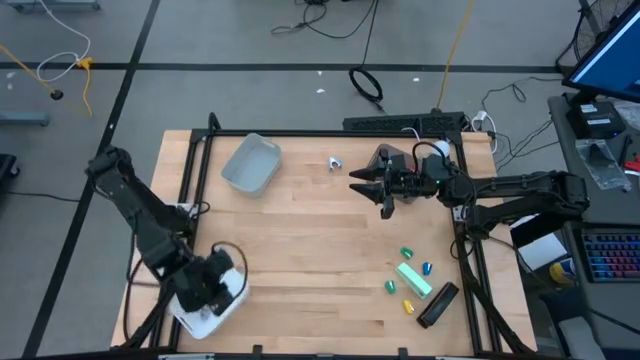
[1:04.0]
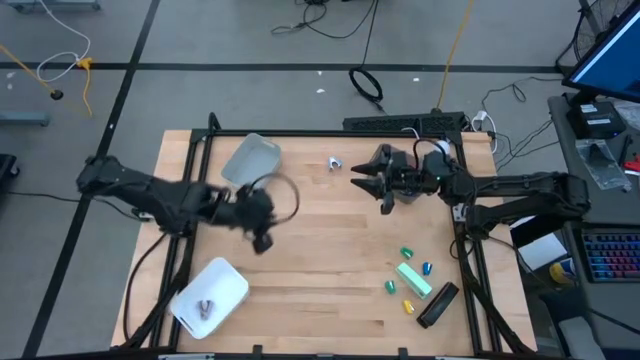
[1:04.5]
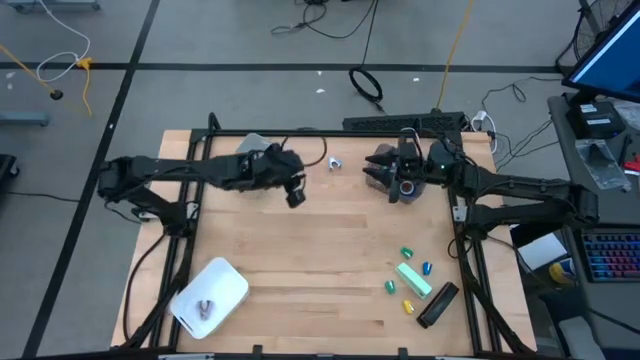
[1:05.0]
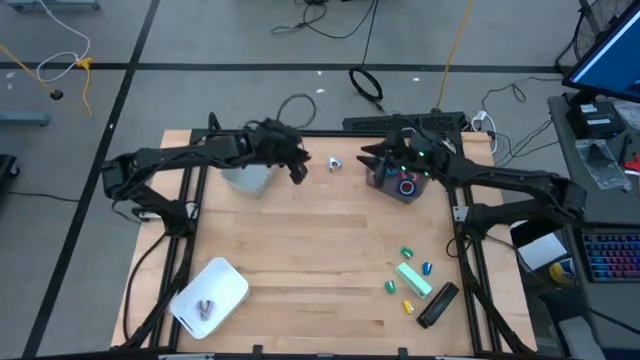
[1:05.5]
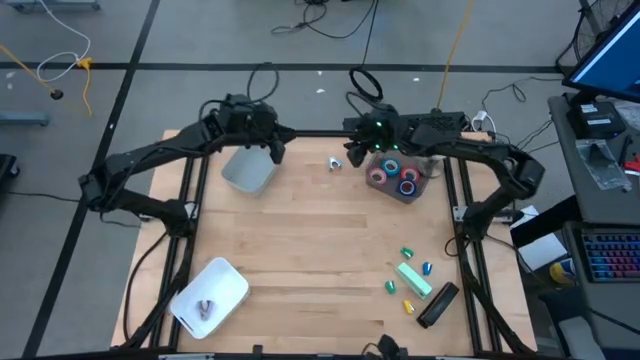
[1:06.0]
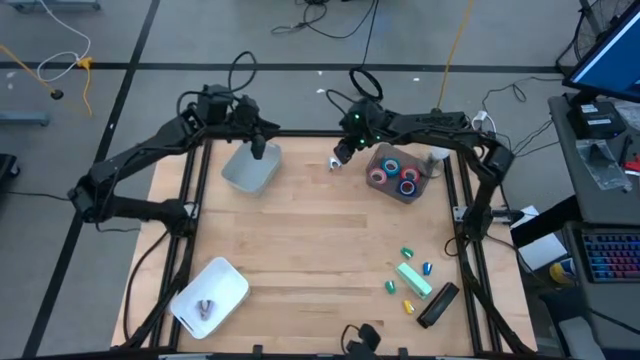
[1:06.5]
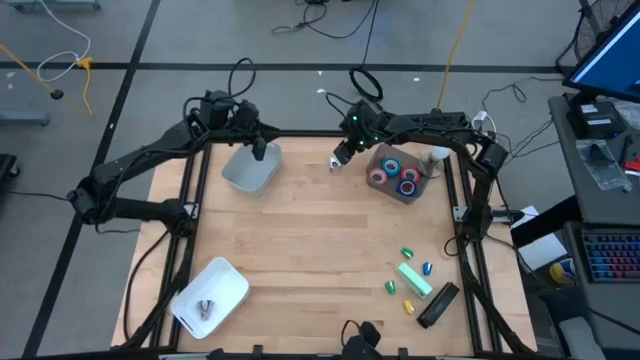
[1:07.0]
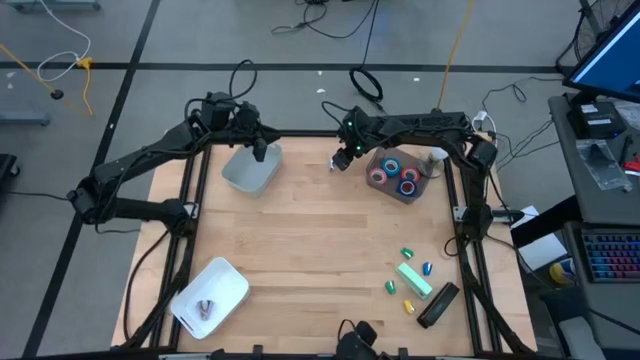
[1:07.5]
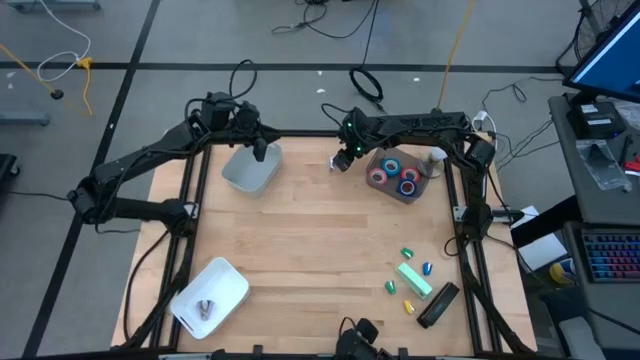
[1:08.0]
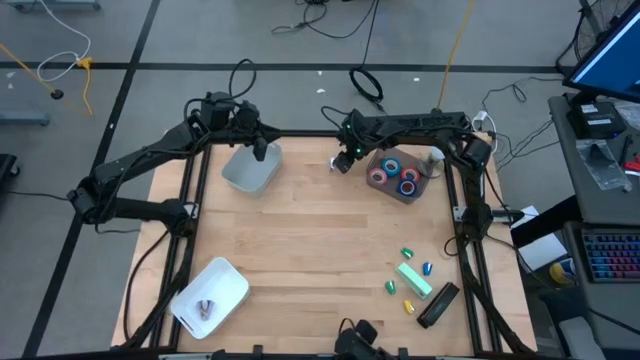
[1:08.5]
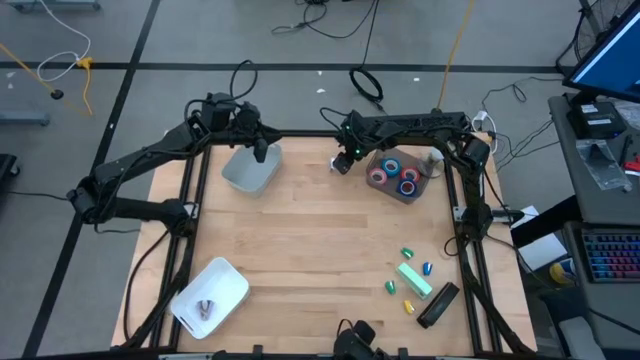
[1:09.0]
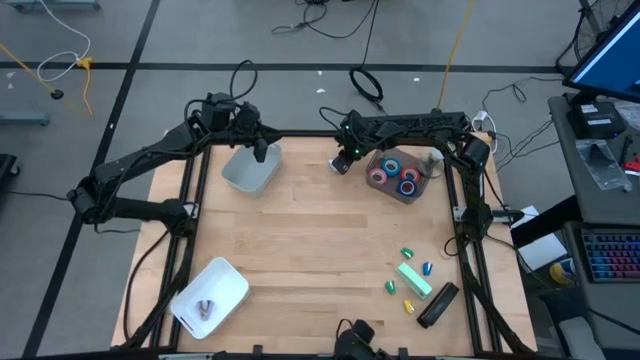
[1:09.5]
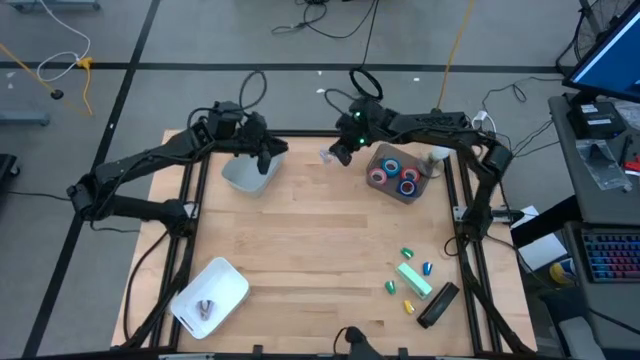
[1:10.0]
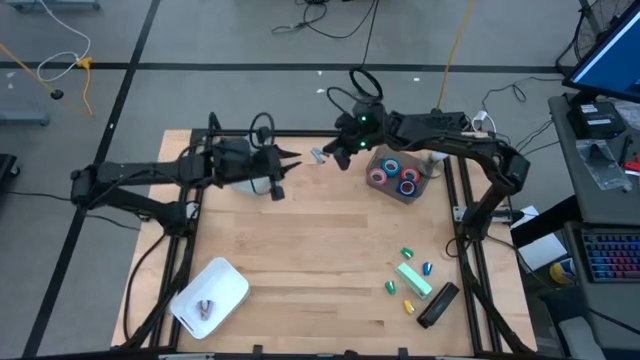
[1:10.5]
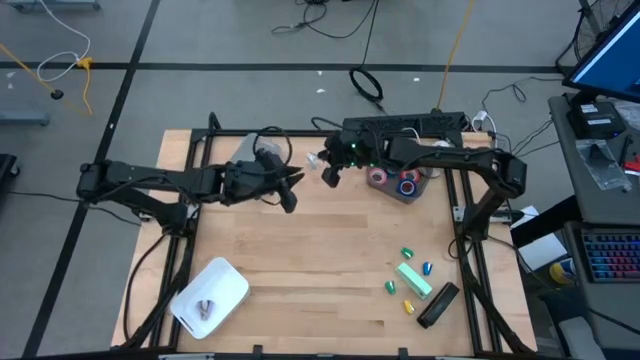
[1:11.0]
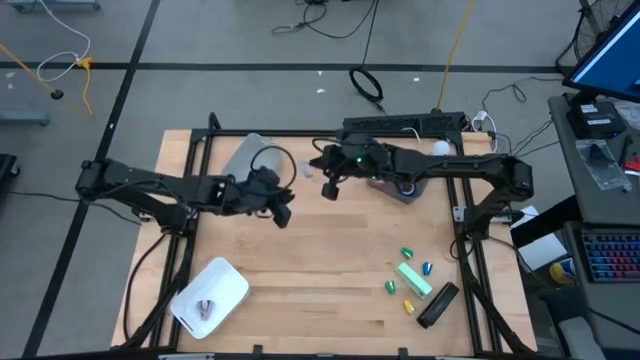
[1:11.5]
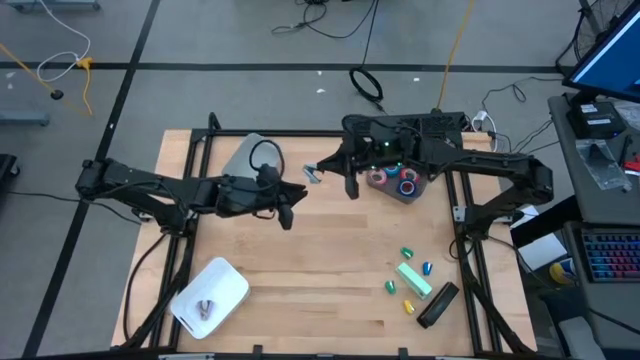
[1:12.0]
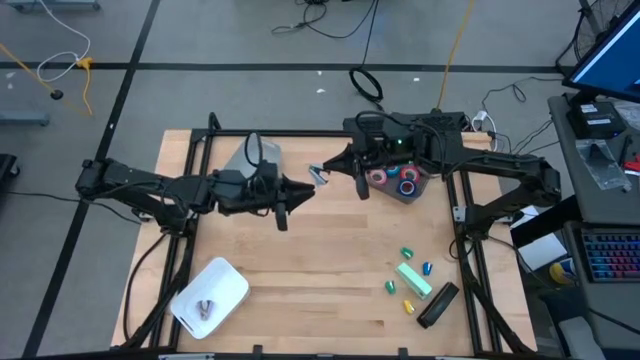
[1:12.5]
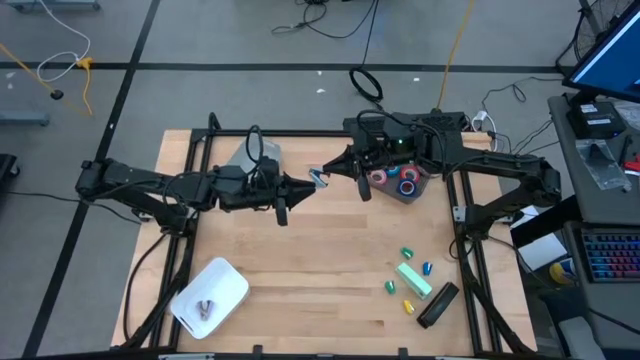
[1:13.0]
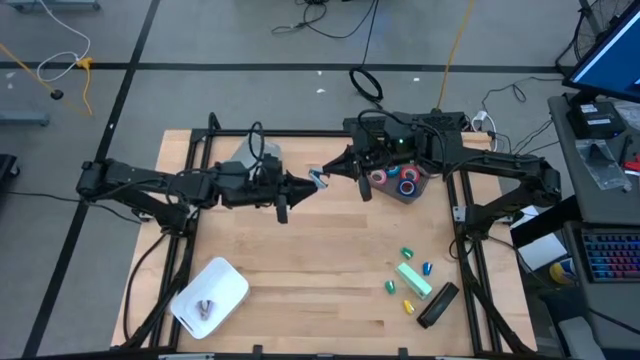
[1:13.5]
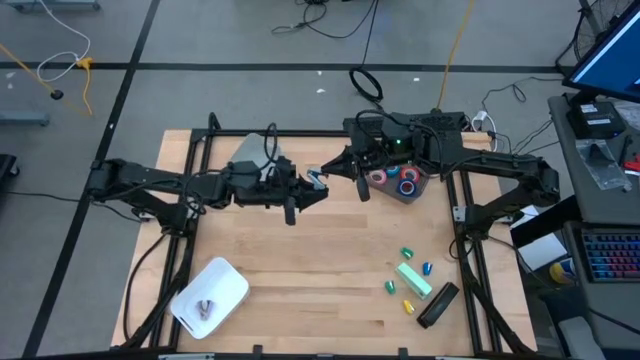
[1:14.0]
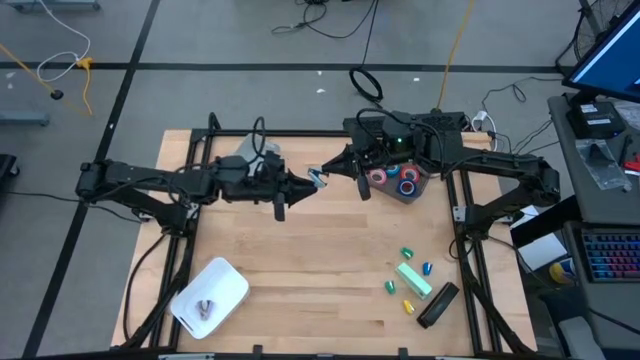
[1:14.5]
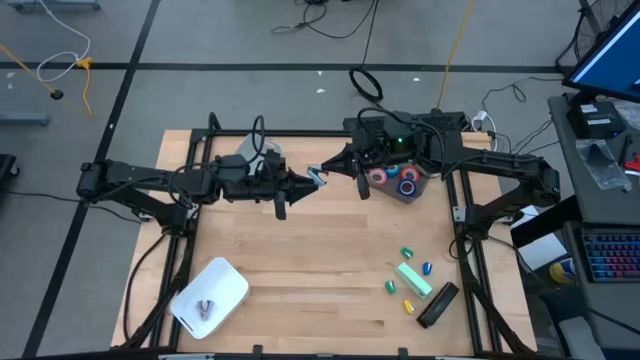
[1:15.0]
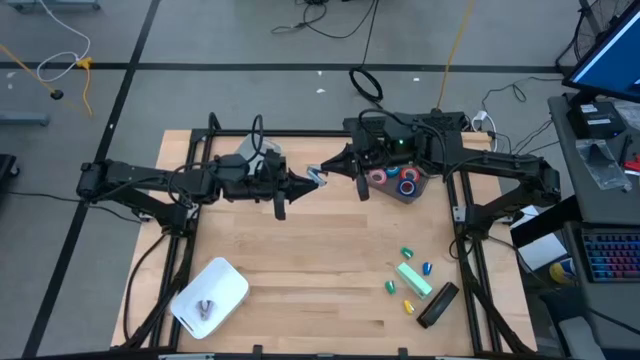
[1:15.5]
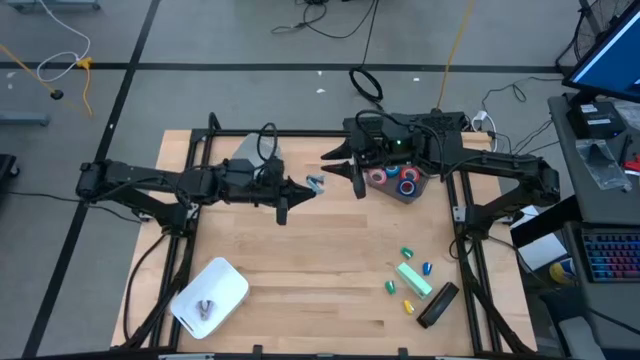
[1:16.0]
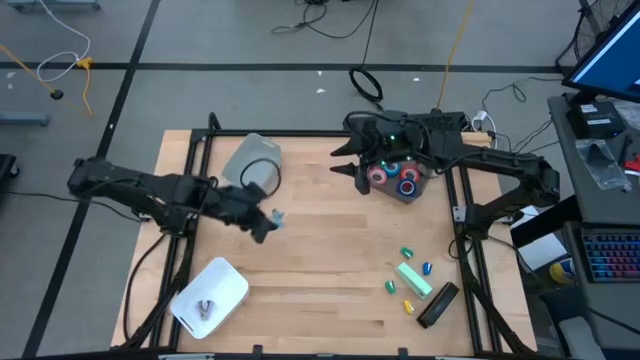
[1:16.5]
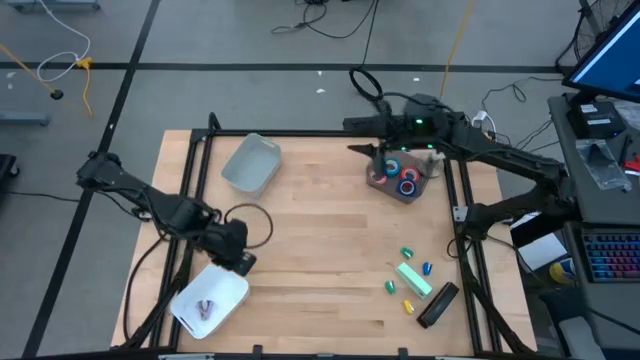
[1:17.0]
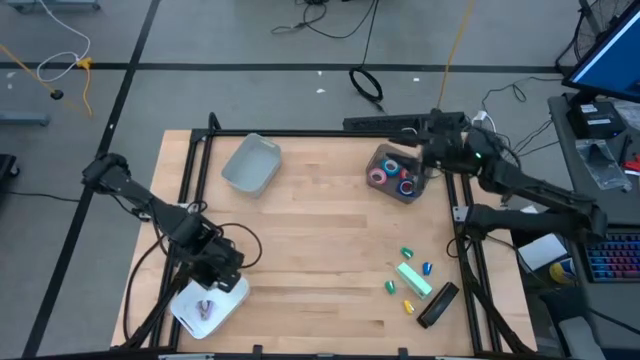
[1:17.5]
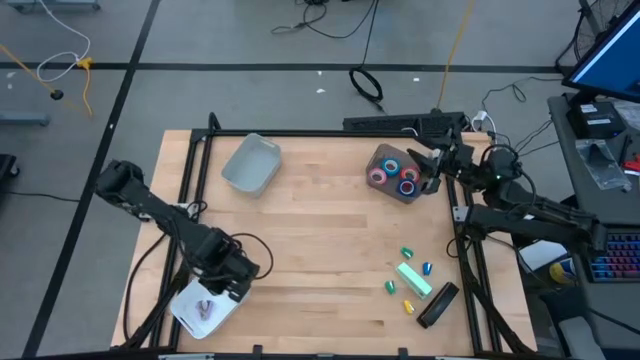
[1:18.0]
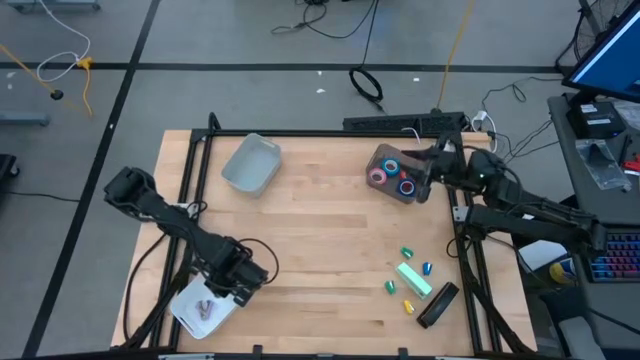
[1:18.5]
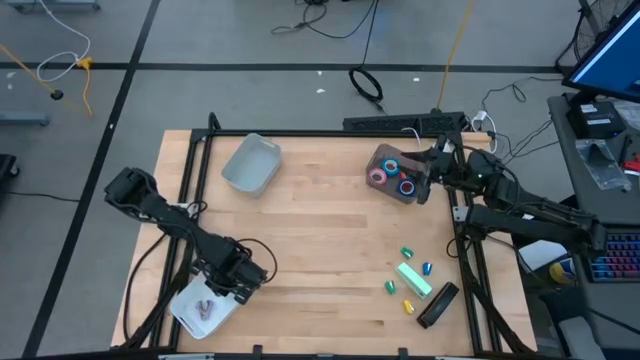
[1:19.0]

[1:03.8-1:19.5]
Task: Pick and place Stapler, Stapler remover, tape
Put the blue staple remover into the white bin

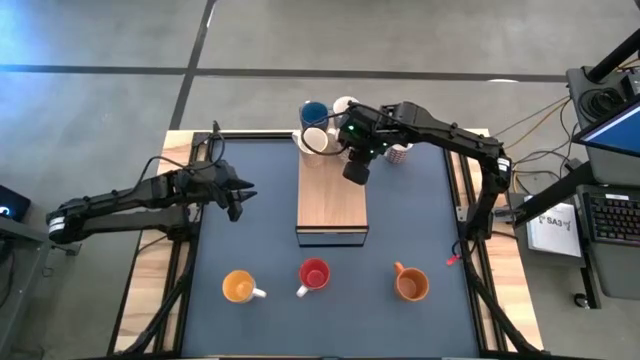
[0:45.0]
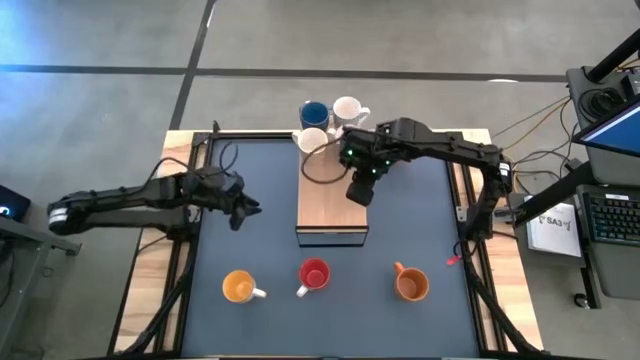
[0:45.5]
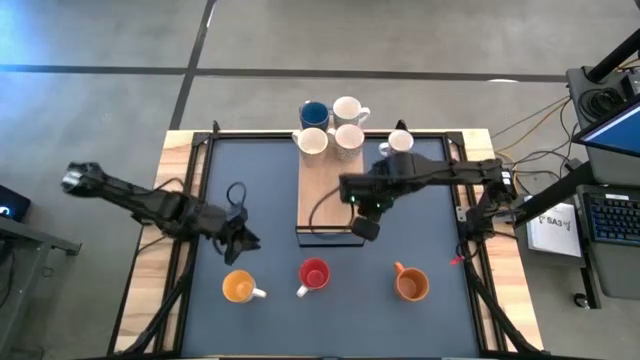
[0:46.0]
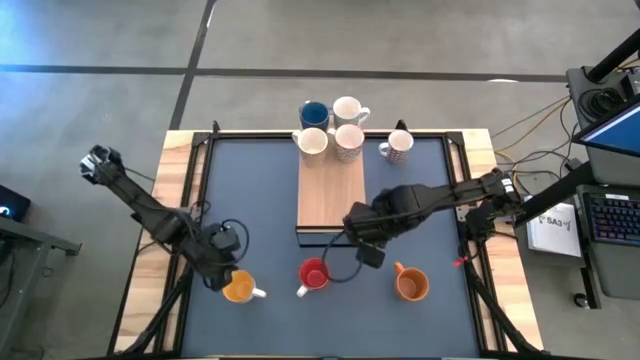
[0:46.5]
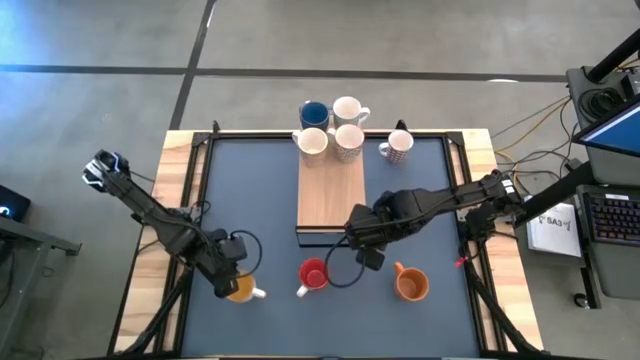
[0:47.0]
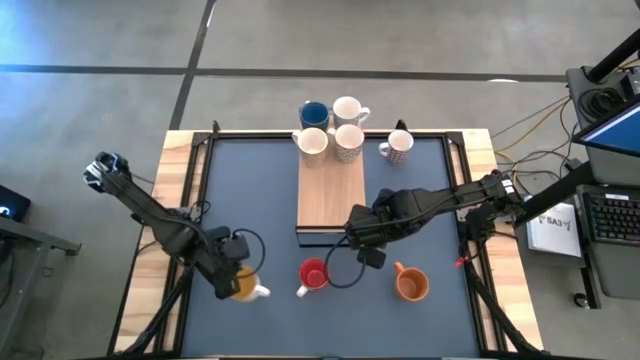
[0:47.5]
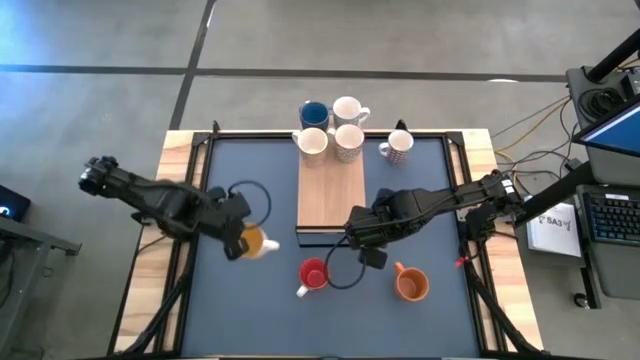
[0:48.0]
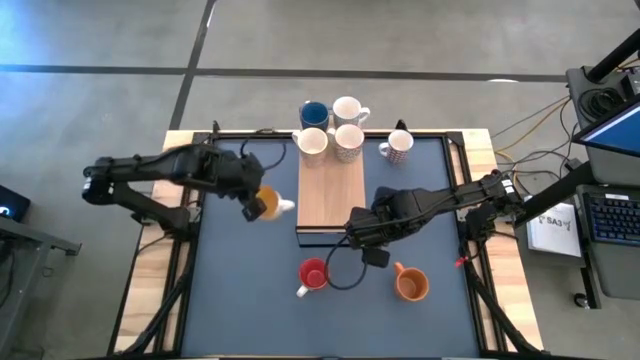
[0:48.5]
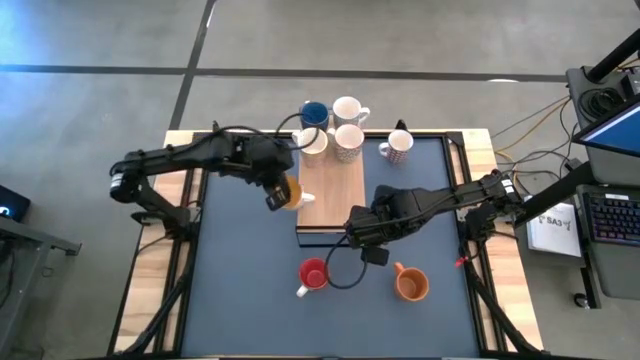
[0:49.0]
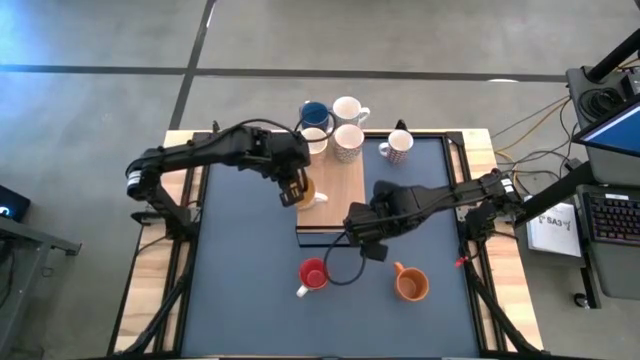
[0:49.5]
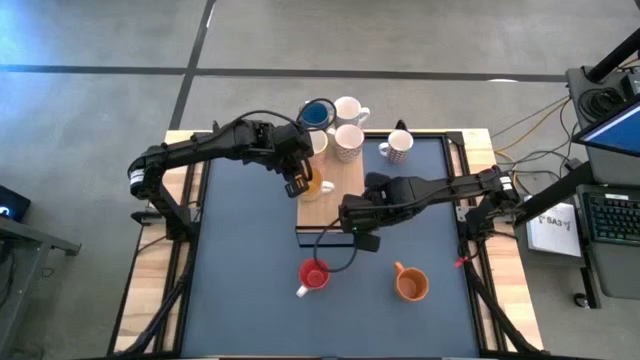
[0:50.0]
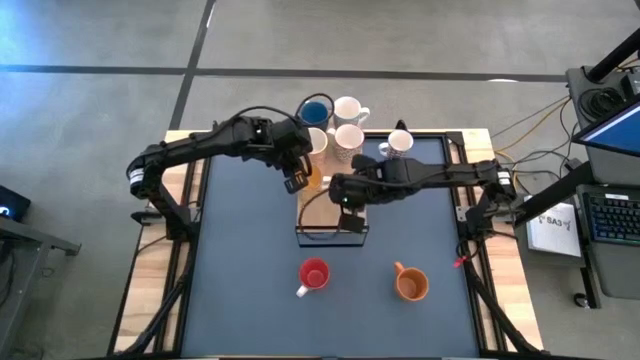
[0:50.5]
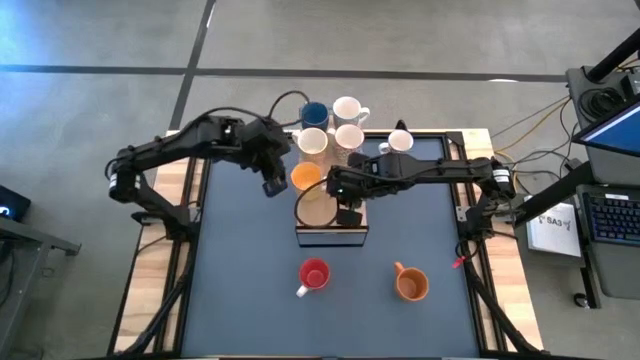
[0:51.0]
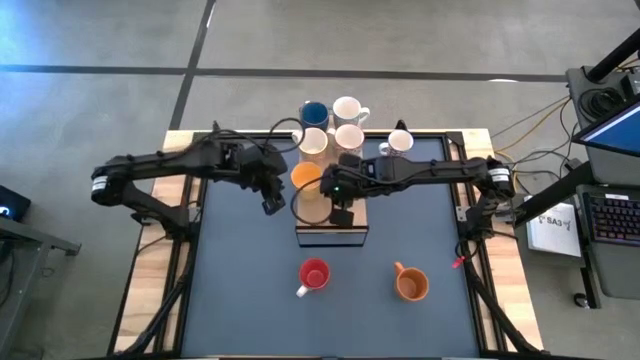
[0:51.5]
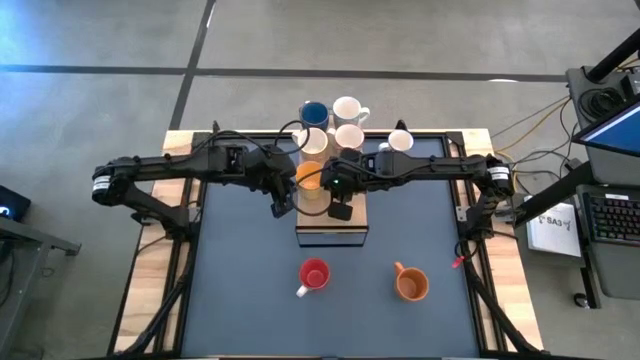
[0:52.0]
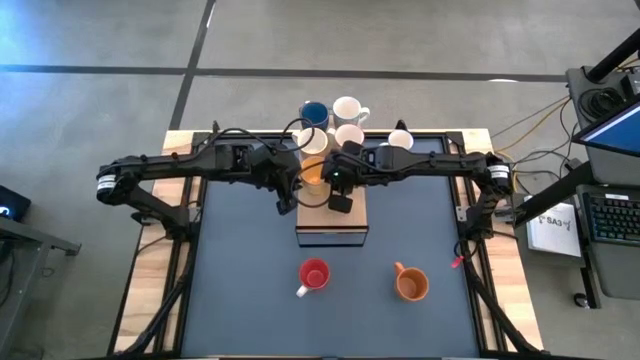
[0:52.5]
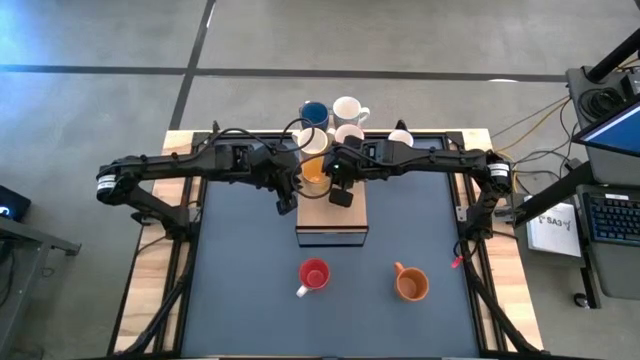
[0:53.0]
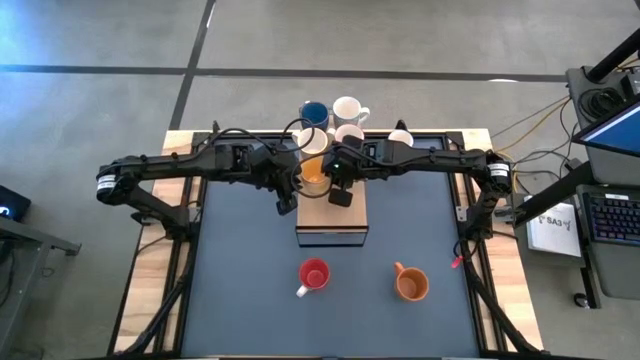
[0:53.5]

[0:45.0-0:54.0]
Task: Place coffee mugs
Put the yellow mug on the shelf
